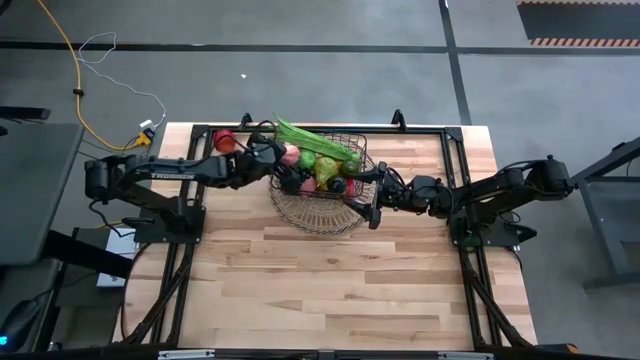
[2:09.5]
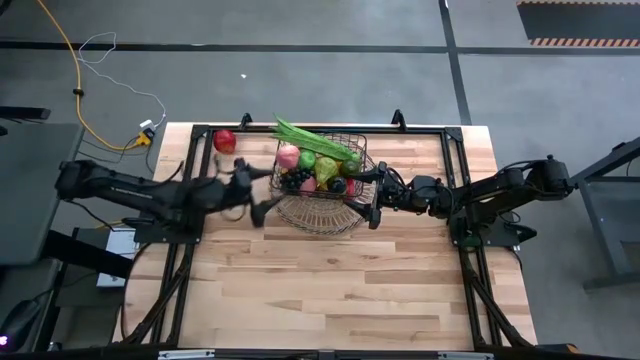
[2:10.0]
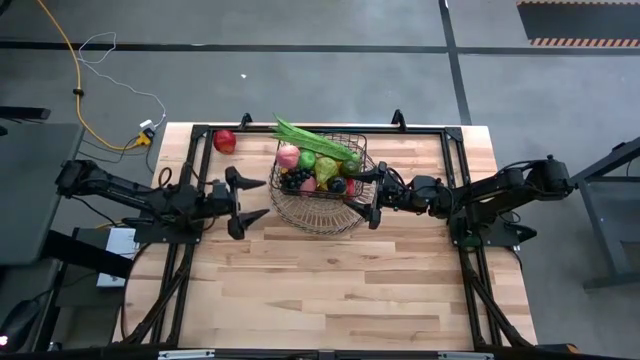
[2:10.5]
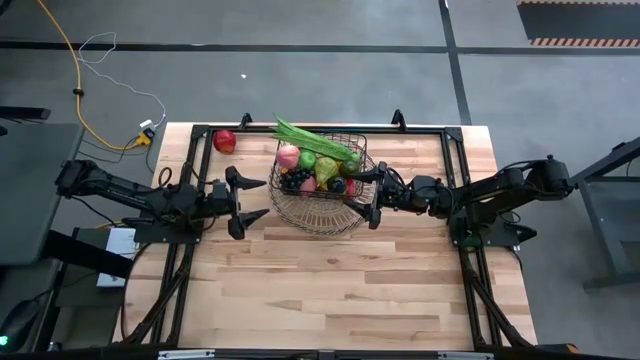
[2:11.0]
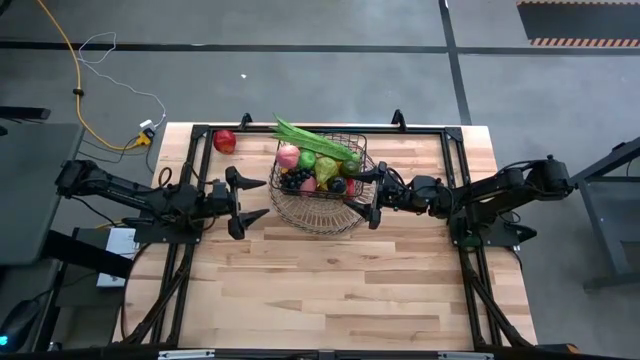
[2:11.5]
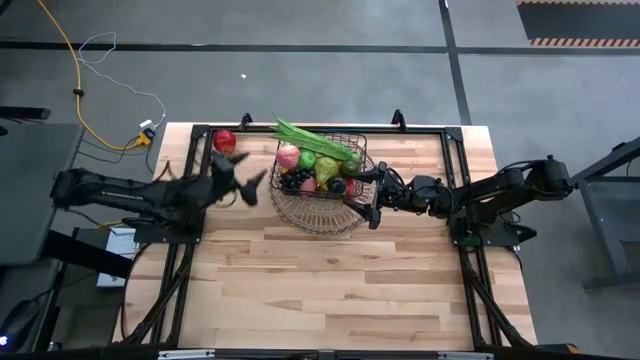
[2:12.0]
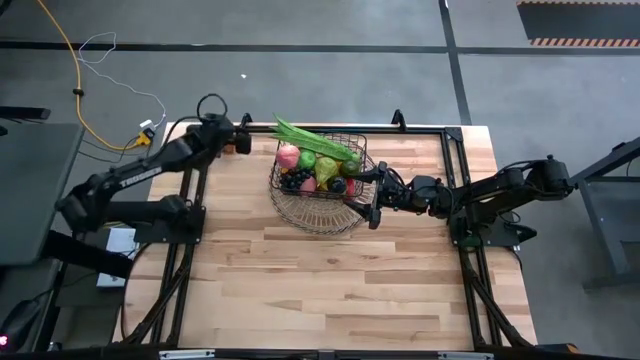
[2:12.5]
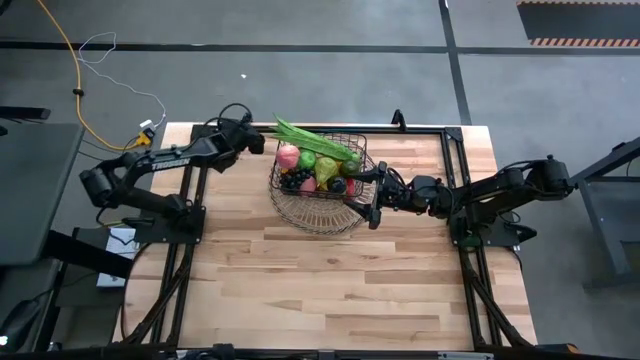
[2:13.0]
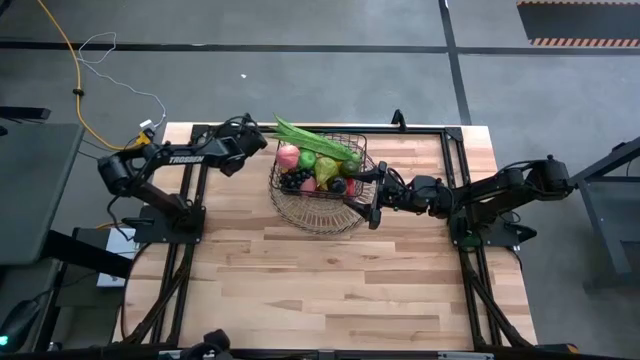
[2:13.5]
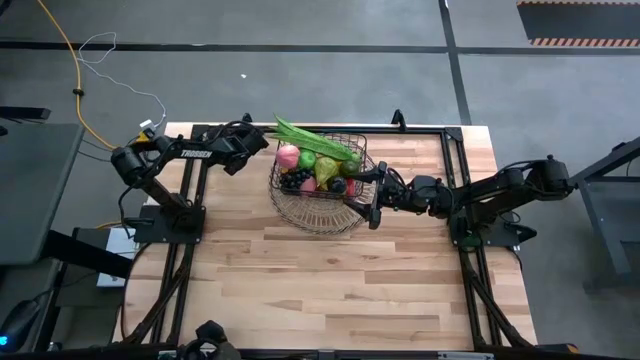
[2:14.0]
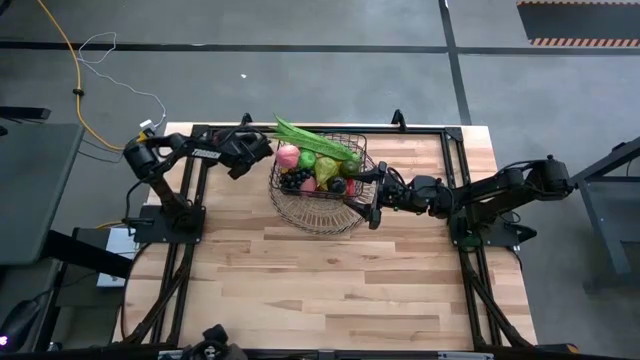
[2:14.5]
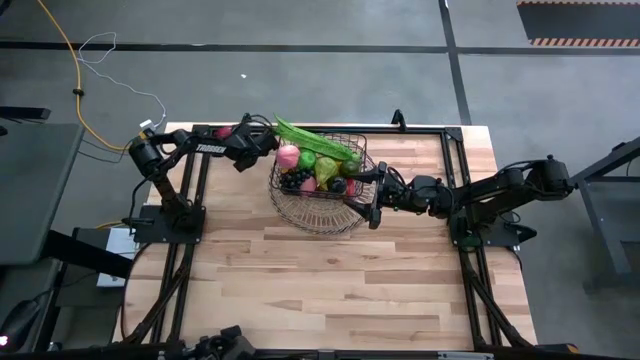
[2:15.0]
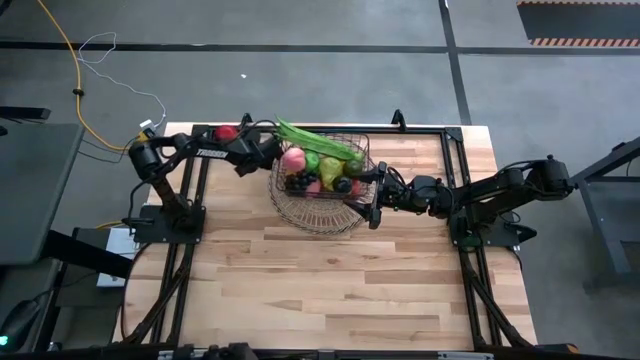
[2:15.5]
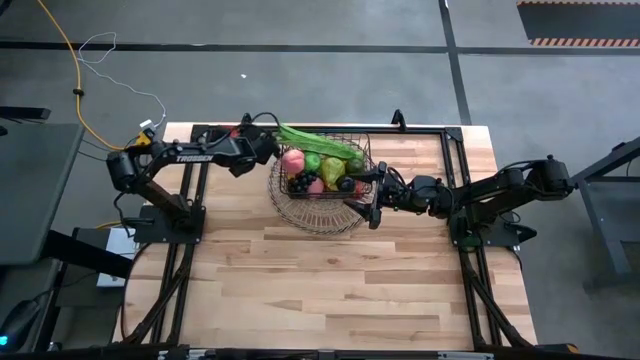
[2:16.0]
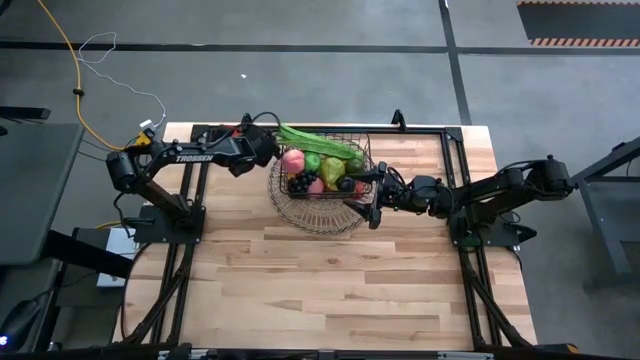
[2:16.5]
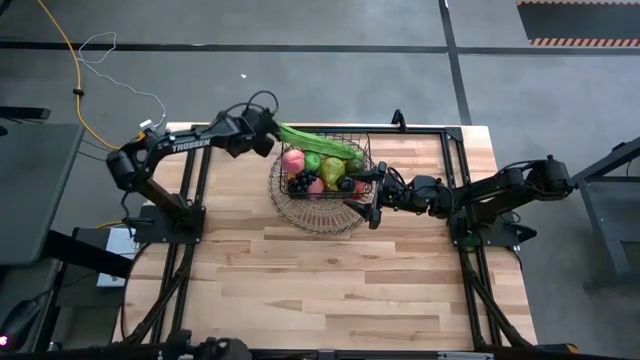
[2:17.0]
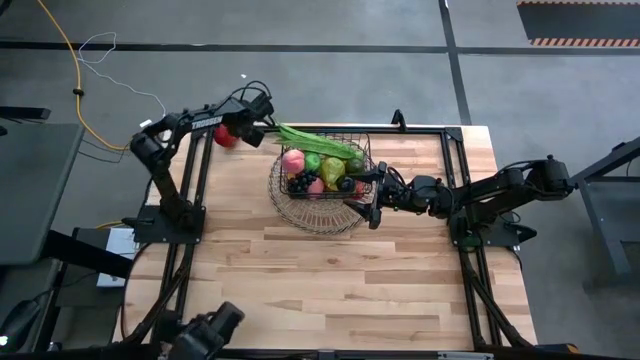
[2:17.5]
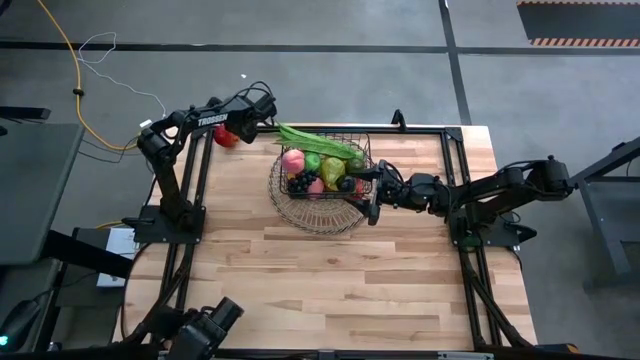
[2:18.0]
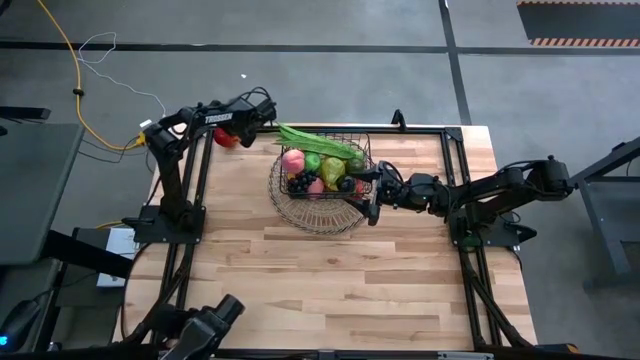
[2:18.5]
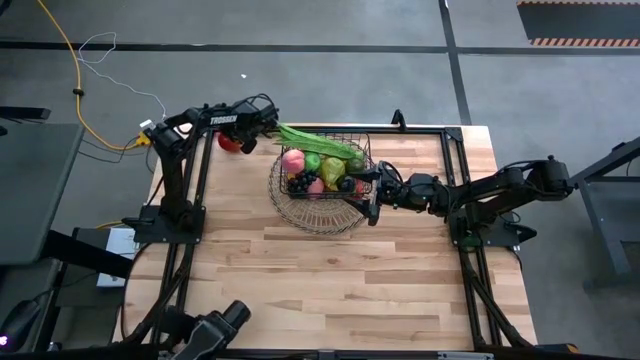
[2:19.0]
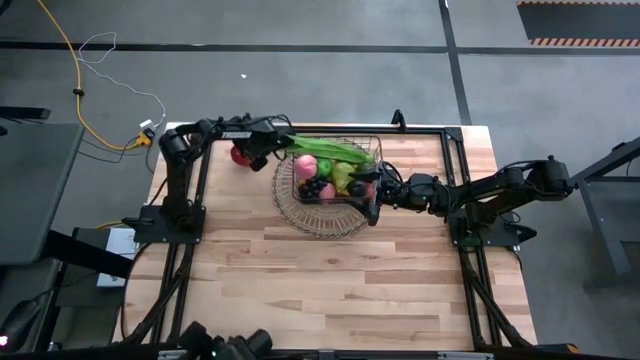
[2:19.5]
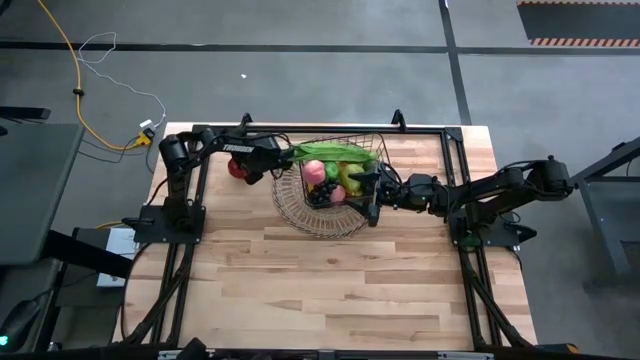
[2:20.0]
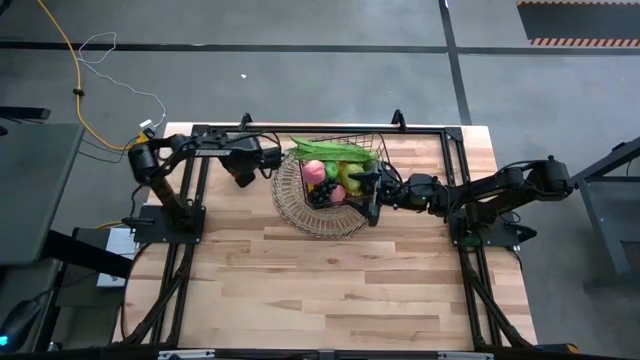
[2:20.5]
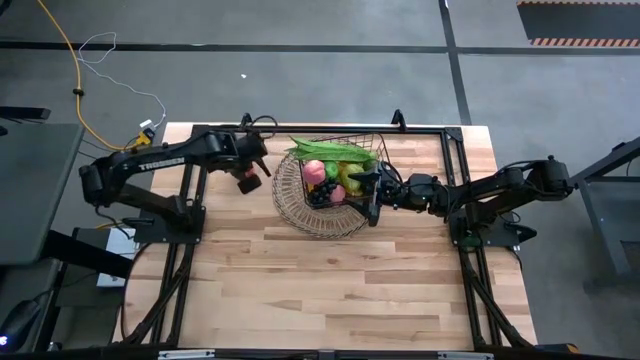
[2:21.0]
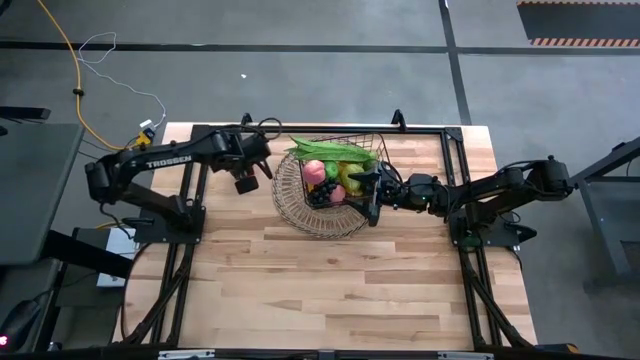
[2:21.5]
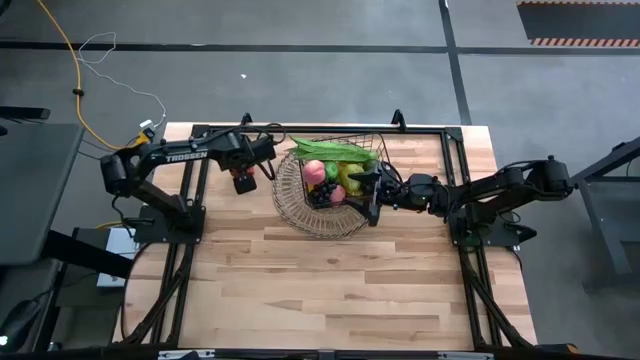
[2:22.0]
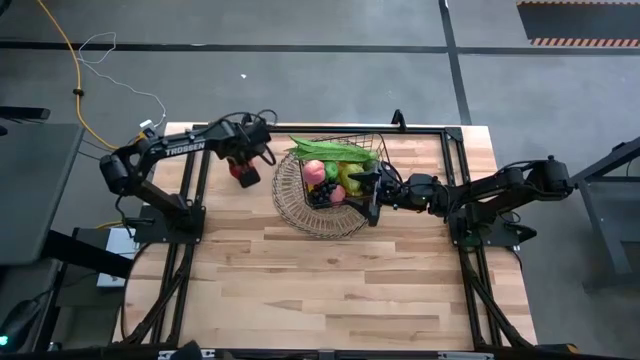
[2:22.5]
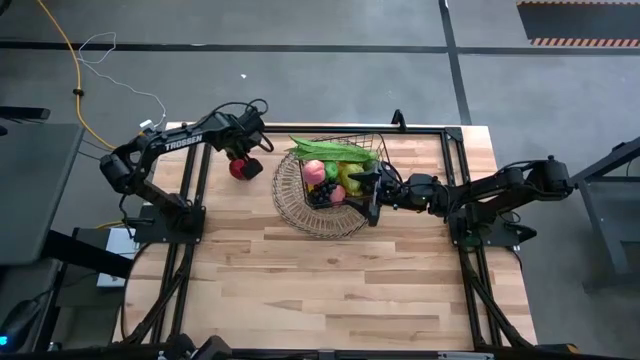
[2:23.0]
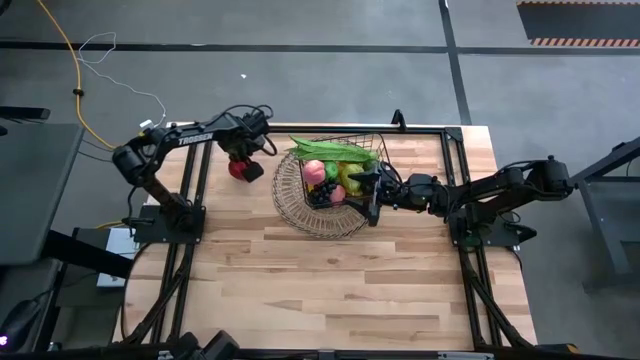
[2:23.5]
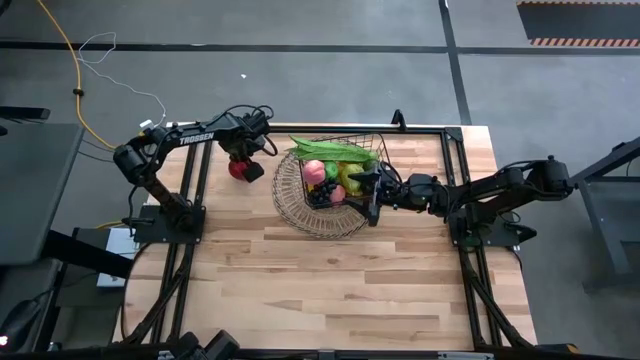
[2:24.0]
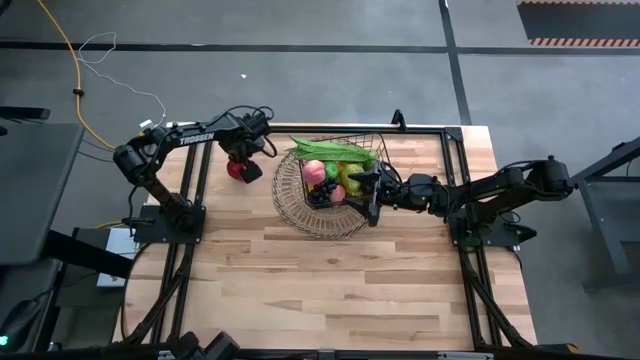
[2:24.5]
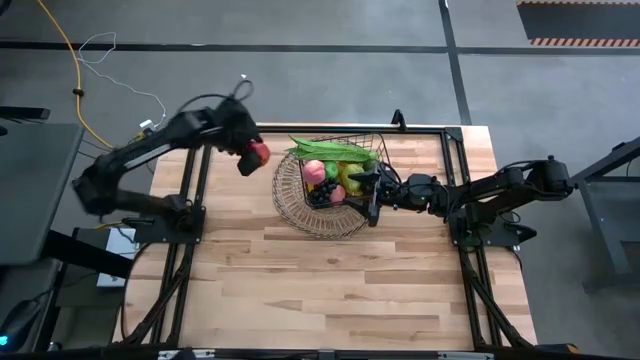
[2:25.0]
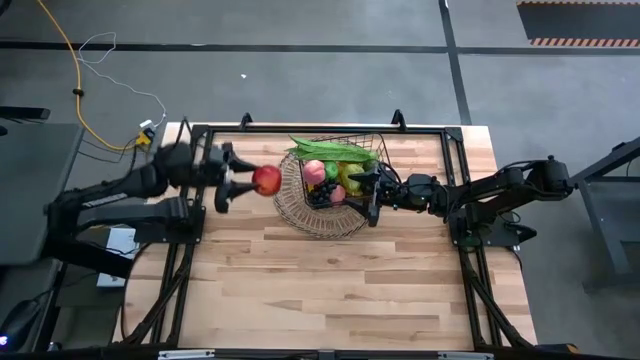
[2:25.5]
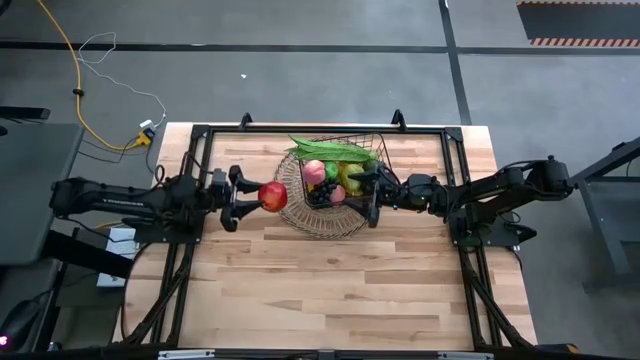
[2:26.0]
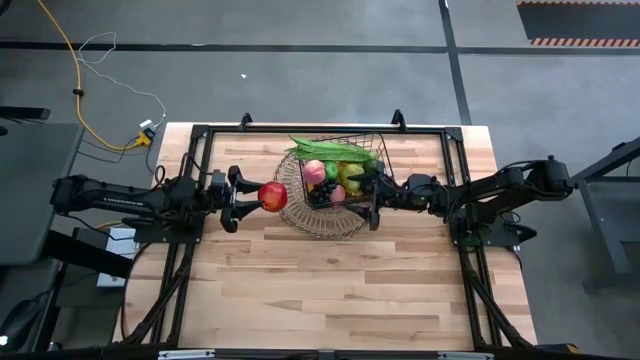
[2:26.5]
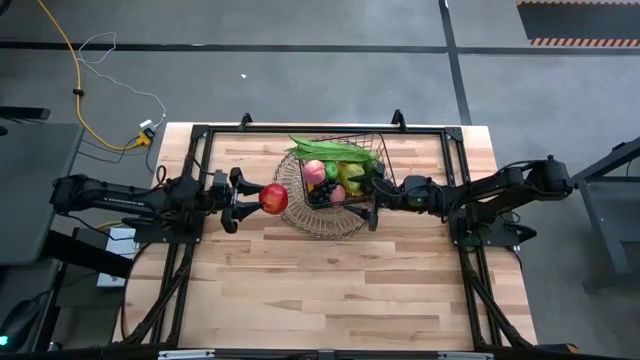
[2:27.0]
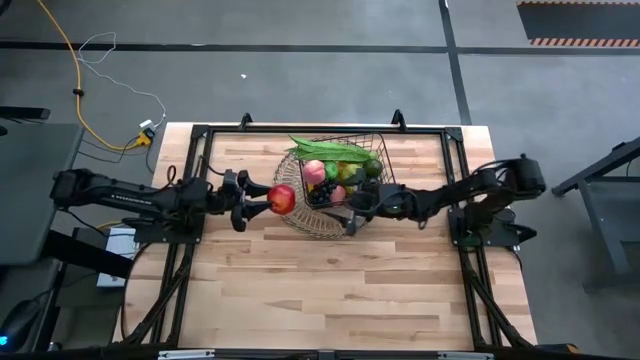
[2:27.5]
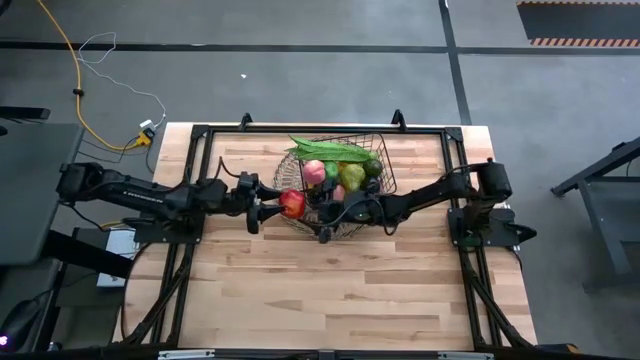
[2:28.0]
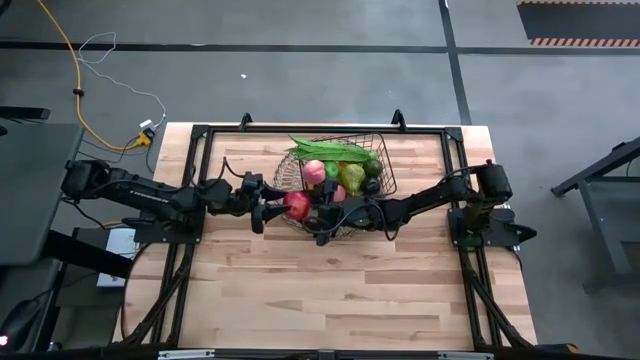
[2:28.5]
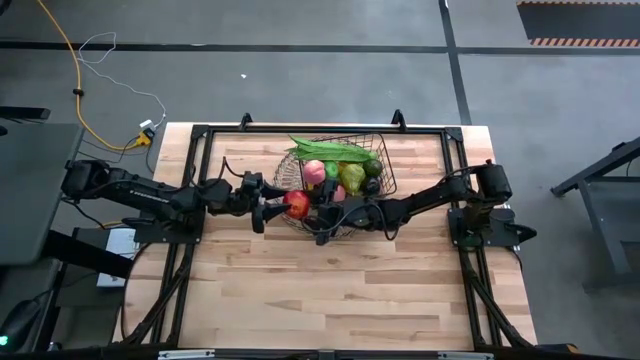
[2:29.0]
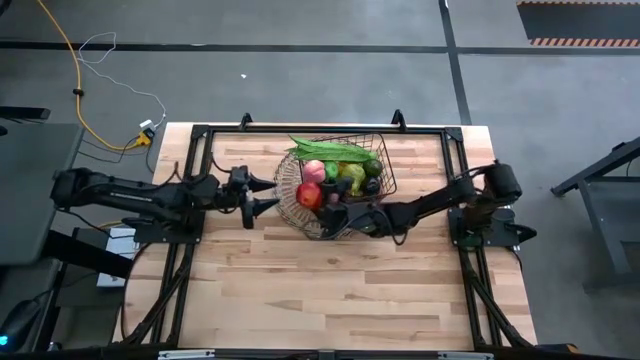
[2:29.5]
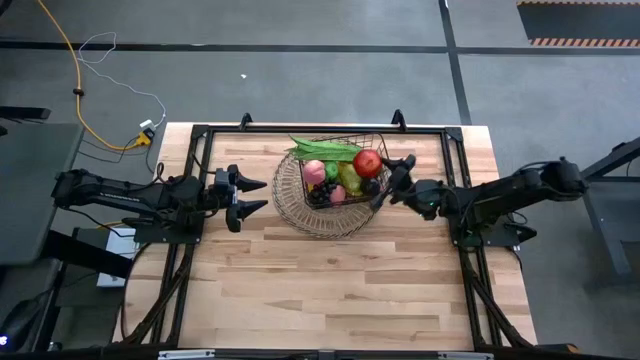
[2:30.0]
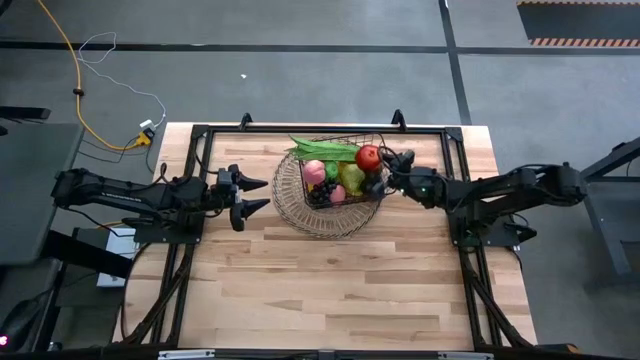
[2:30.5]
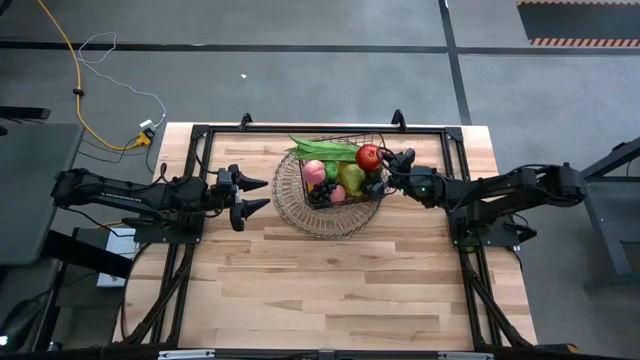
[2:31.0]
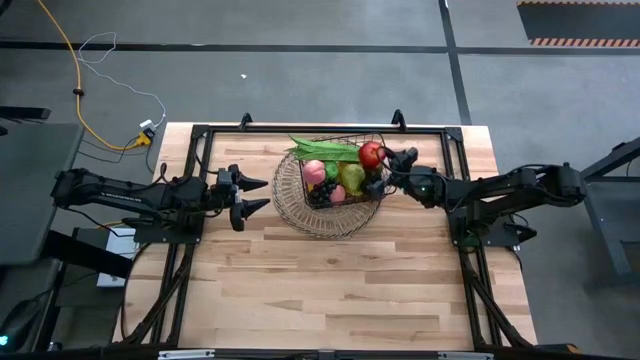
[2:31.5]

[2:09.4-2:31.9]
Task: Build produce basket
Put the pomegranate into the wire basket
